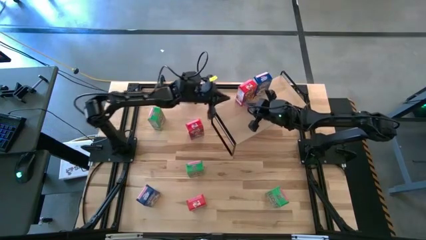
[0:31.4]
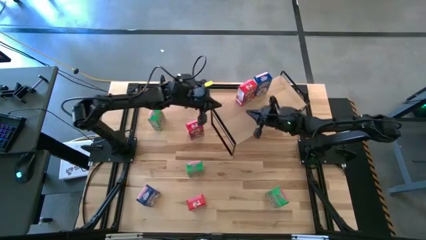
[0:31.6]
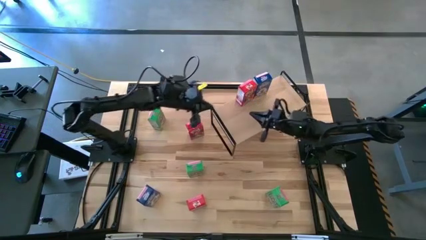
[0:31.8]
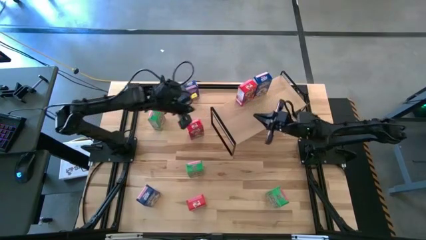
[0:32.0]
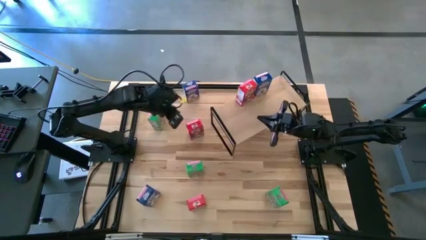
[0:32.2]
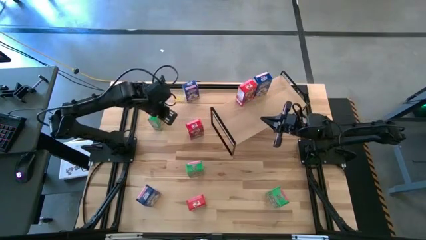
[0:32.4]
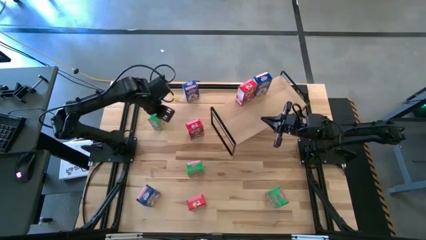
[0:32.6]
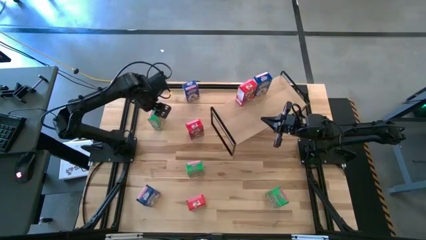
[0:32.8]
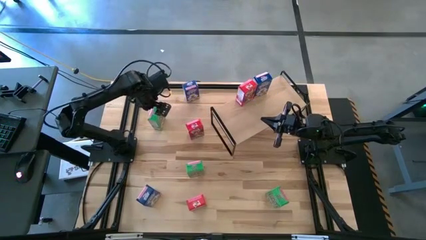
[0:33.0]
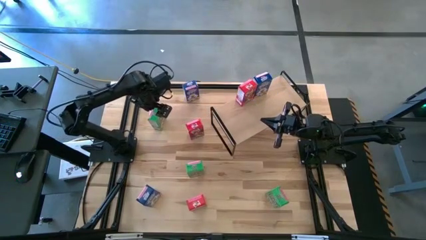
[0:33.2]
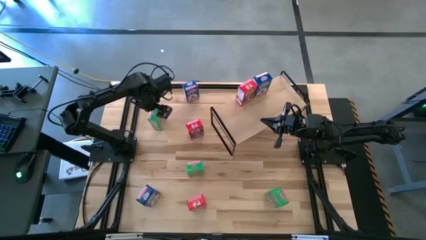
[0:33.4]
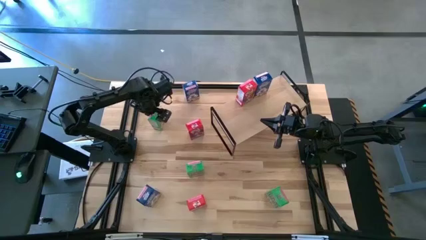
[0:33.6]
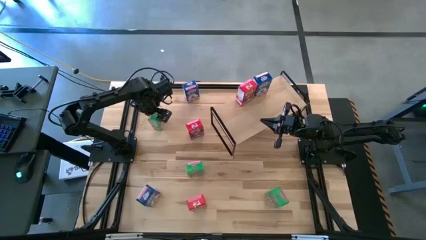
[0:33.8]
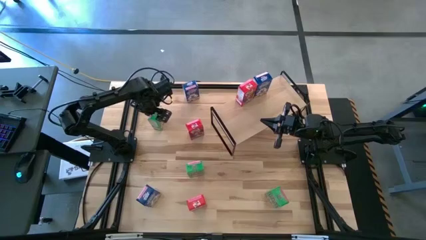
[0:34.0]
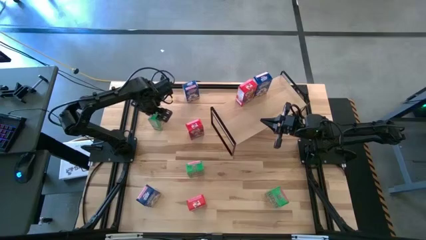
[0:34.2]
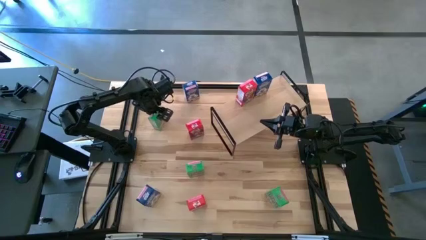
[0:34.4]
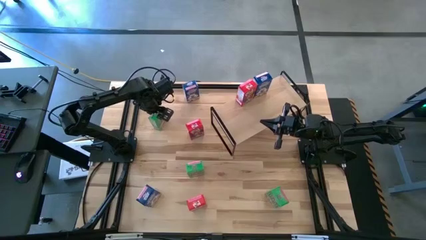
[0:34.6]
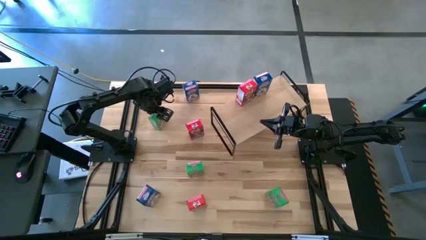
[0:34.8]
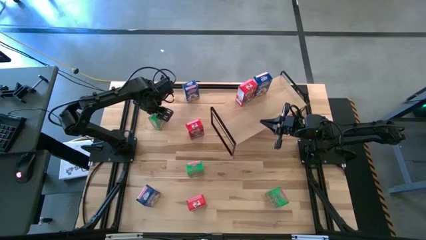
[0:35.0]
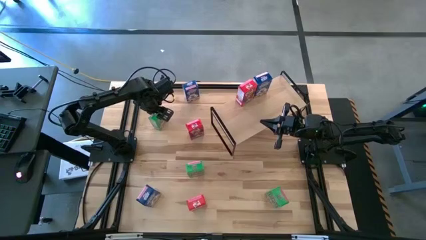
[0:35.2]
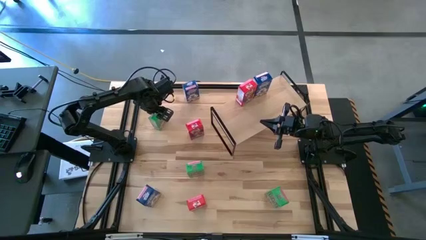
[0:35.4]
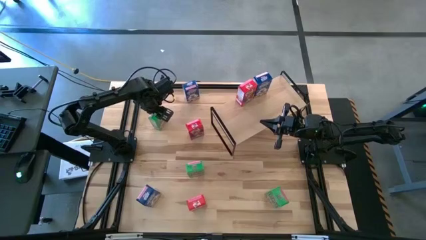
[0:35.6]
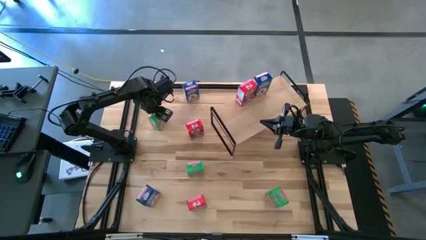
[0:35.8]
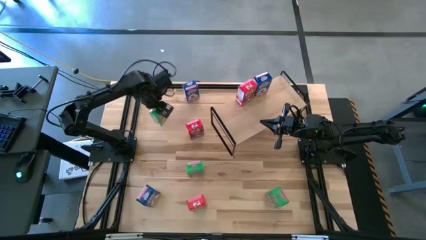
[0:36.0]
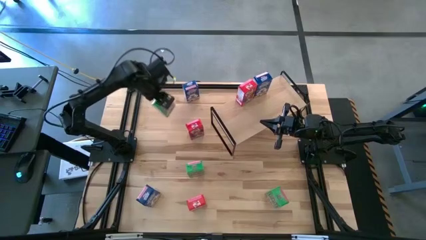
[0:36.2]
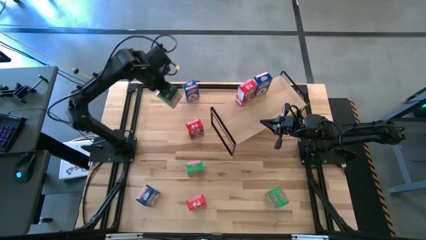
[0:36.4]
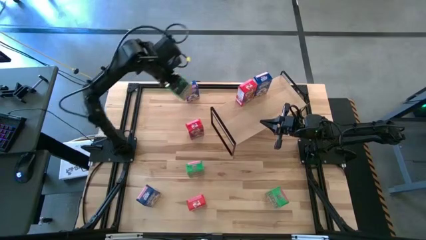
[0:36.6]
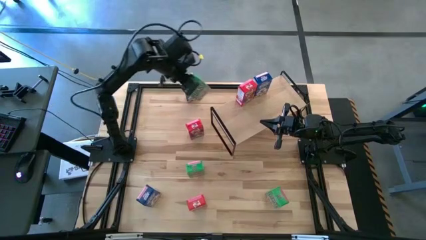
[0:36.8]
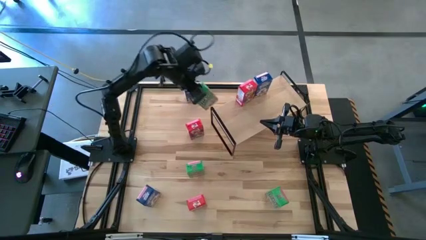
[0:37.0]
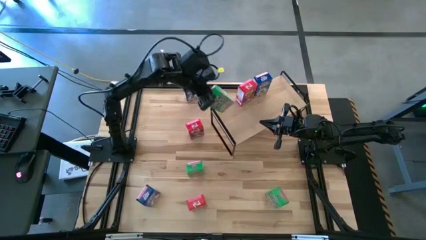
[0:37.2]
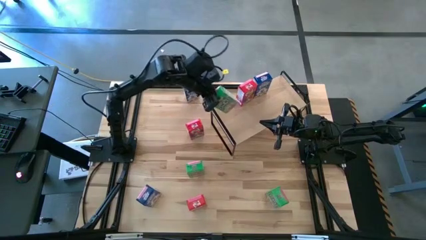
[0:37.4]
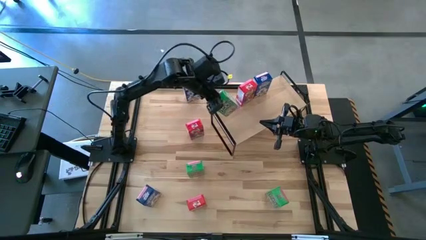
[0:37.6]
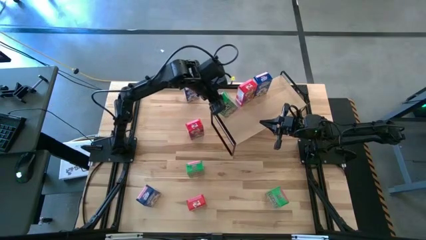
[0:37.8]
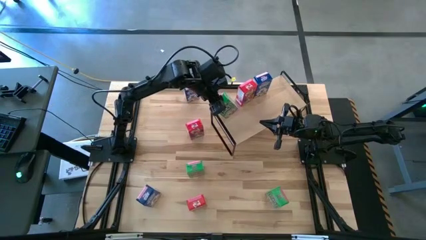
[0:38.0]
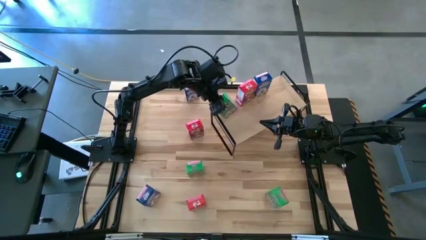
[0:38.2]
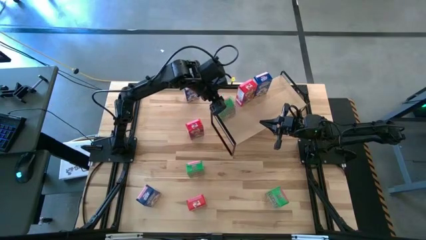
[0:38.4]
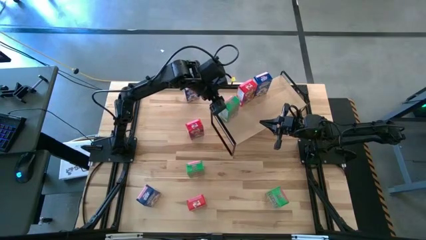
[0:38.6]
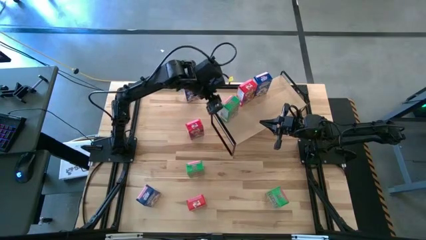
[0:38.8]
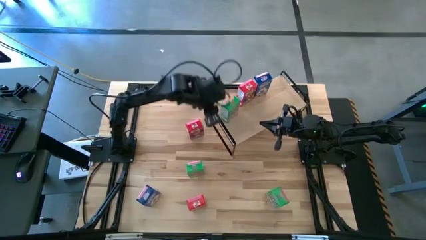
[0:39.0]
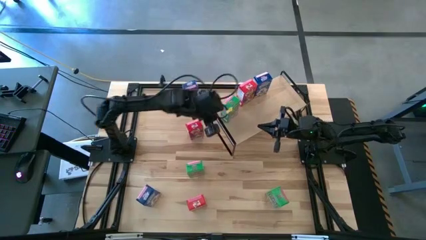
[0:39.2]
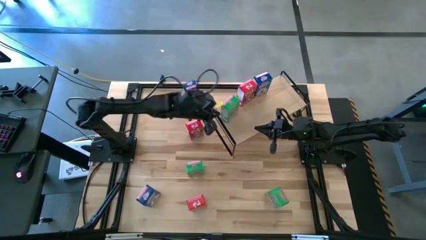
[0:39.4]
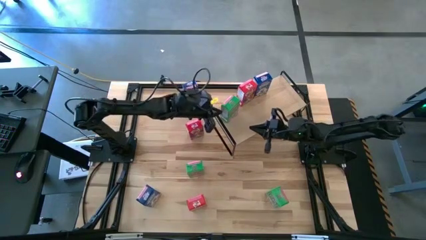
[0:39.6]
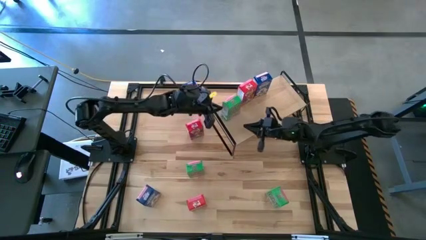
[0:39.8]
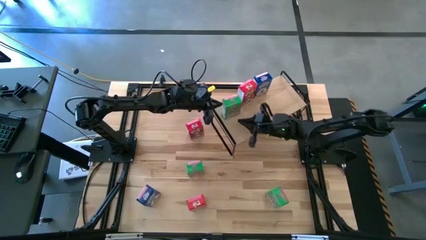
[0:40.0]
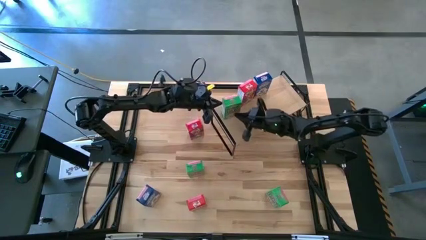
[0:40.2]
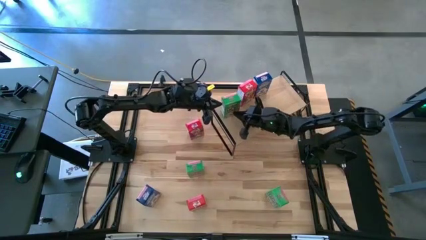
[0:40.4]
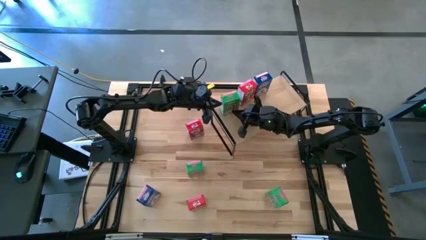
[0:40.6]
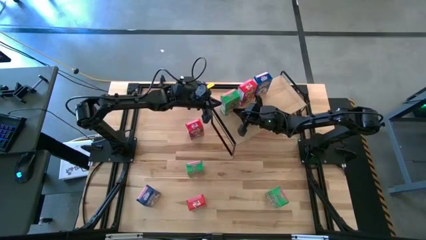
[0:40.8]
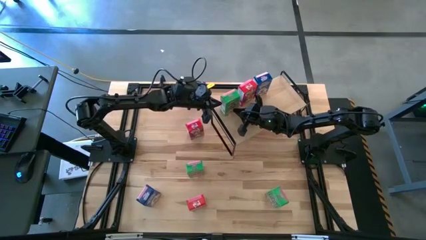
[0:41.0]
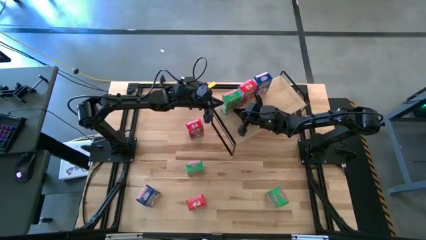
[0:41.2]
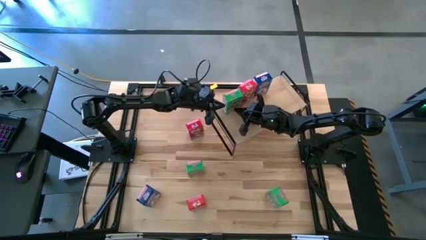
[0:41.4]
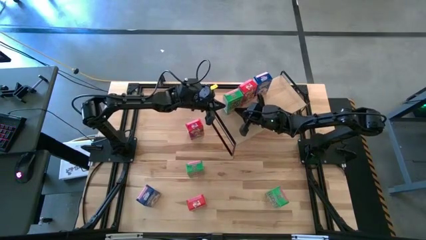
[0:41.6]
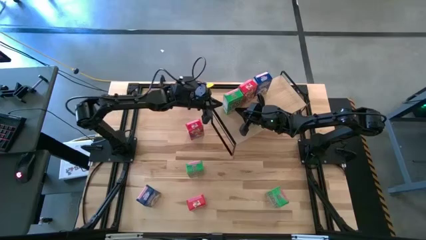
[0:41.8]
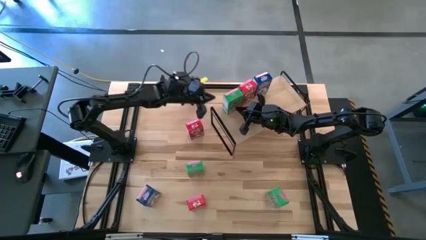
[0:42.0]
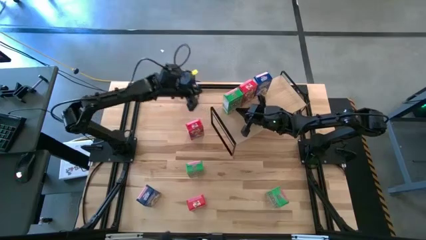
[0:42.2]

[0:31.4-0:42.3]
Task: Stack cereal on shelf
Put the top left green cereal box on the shelf
